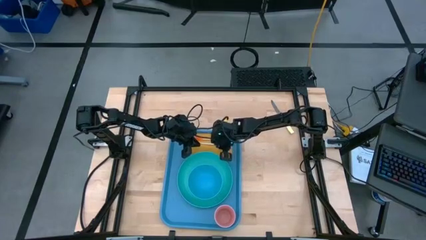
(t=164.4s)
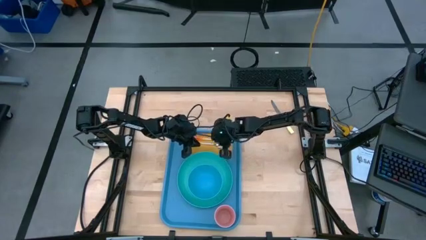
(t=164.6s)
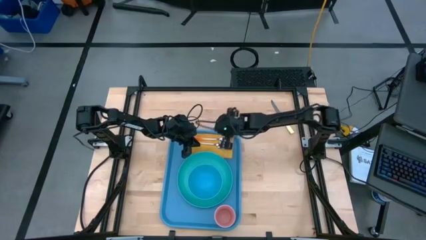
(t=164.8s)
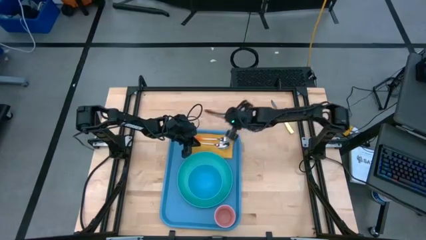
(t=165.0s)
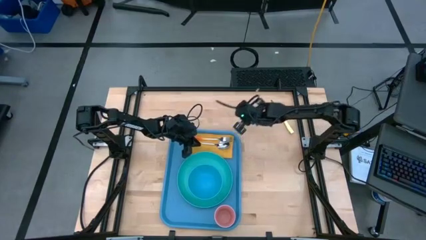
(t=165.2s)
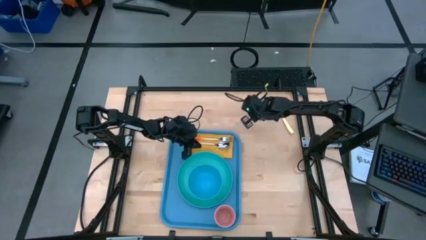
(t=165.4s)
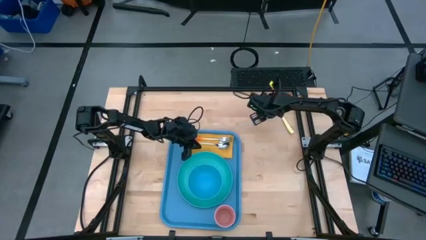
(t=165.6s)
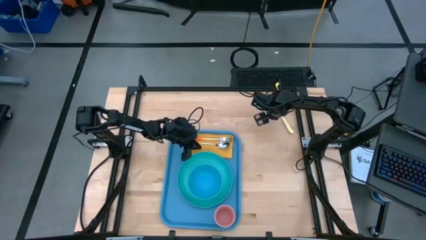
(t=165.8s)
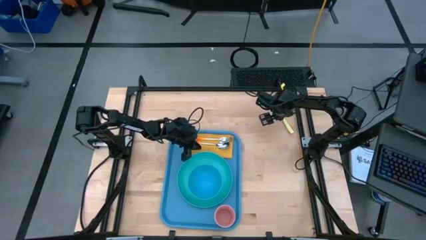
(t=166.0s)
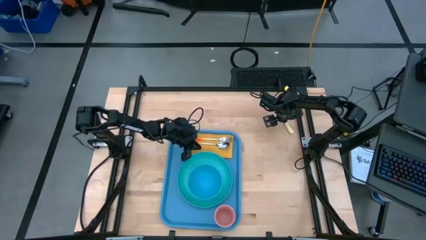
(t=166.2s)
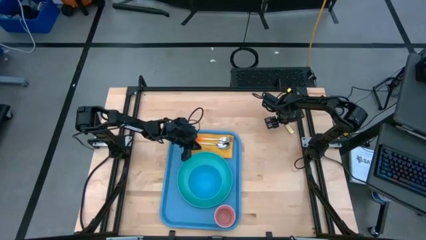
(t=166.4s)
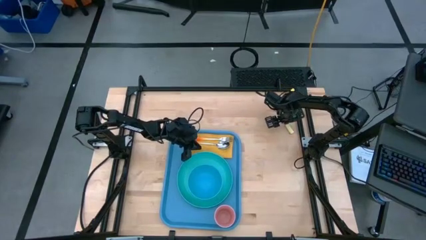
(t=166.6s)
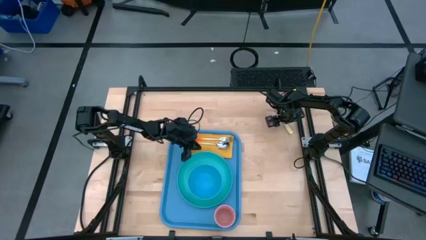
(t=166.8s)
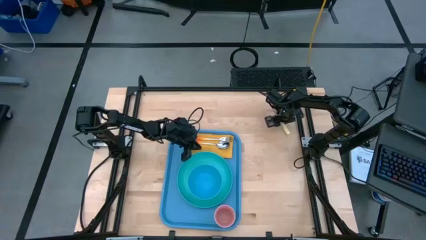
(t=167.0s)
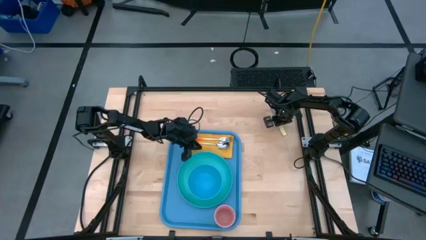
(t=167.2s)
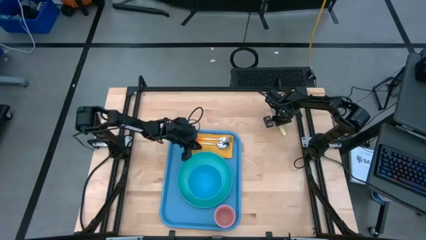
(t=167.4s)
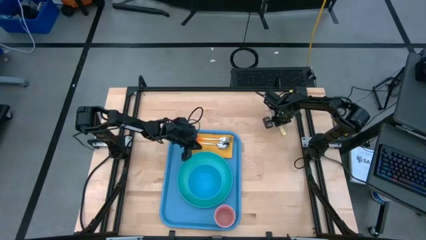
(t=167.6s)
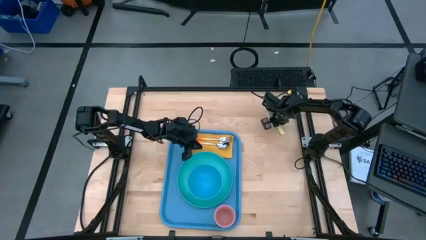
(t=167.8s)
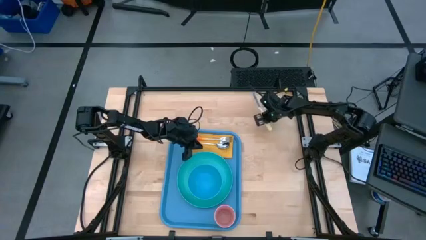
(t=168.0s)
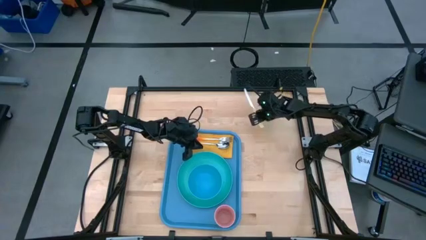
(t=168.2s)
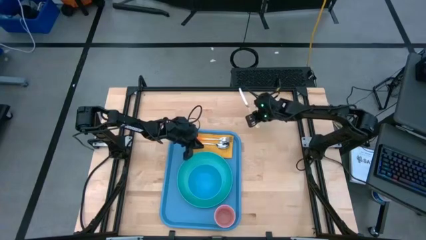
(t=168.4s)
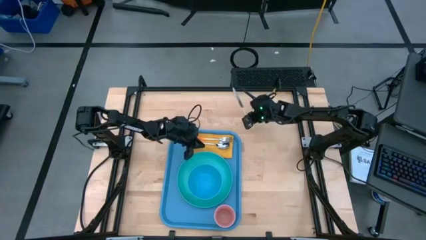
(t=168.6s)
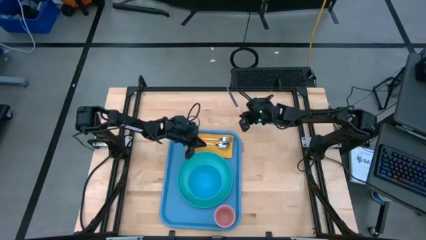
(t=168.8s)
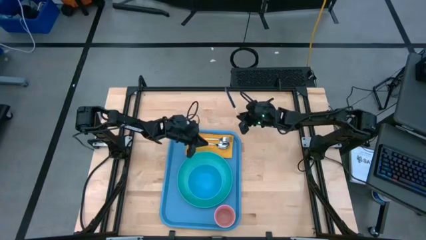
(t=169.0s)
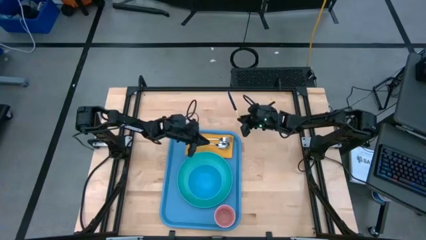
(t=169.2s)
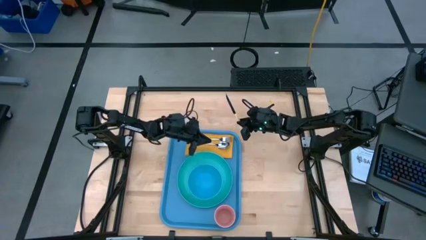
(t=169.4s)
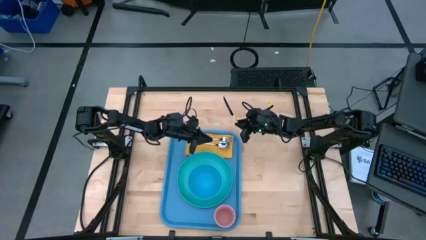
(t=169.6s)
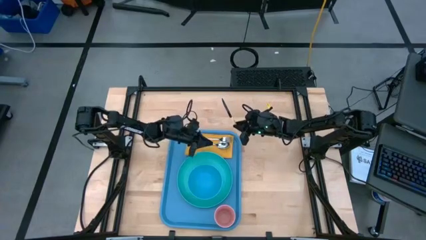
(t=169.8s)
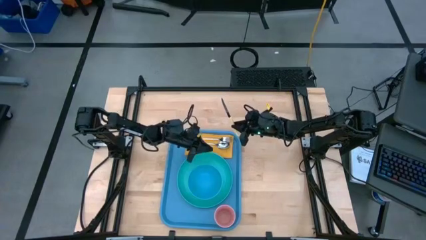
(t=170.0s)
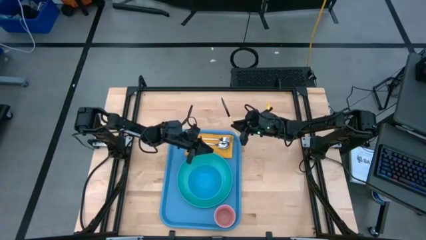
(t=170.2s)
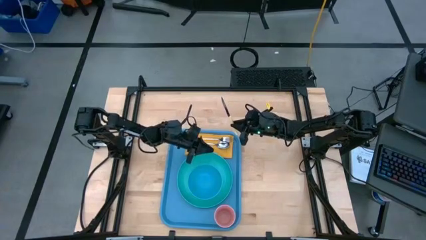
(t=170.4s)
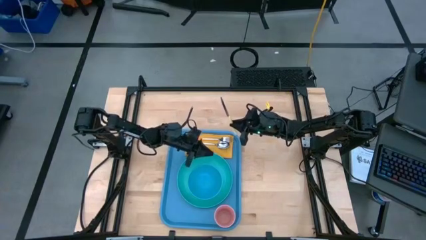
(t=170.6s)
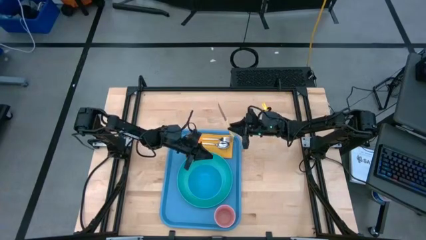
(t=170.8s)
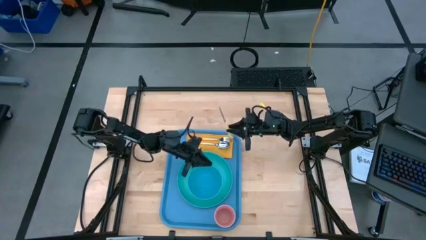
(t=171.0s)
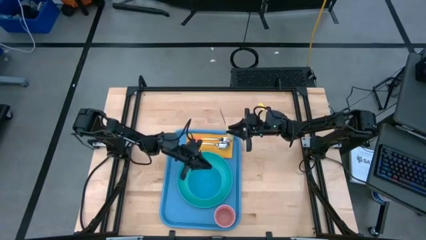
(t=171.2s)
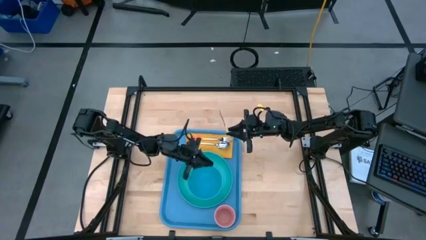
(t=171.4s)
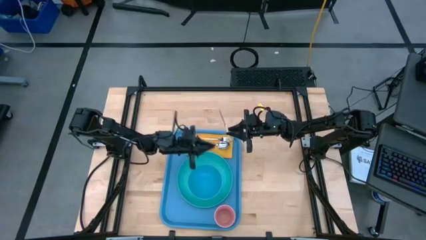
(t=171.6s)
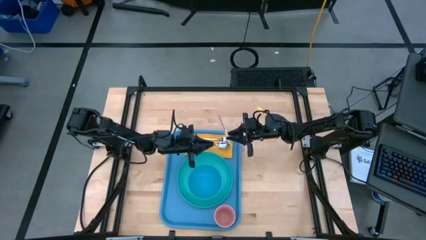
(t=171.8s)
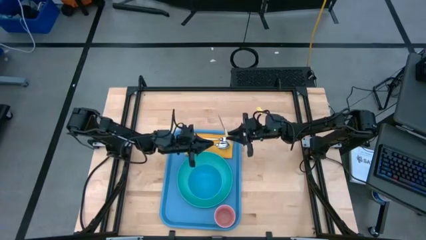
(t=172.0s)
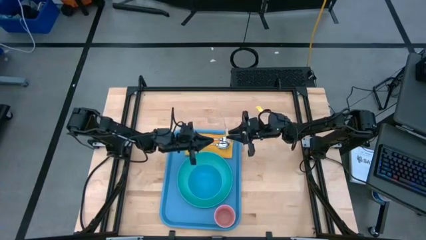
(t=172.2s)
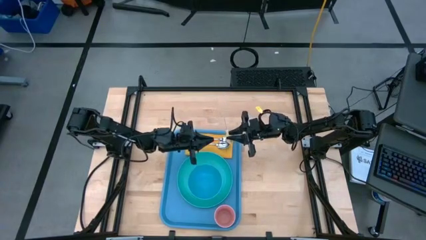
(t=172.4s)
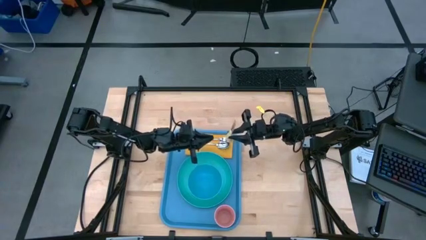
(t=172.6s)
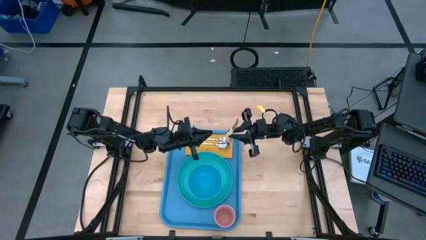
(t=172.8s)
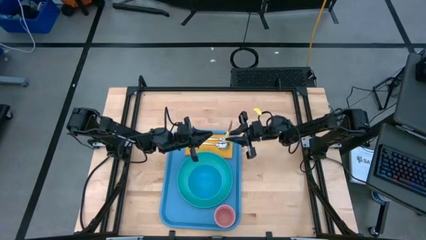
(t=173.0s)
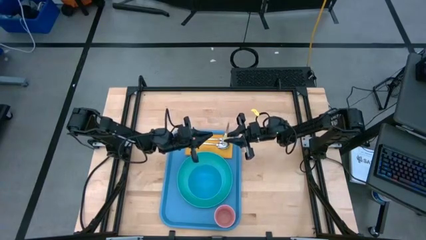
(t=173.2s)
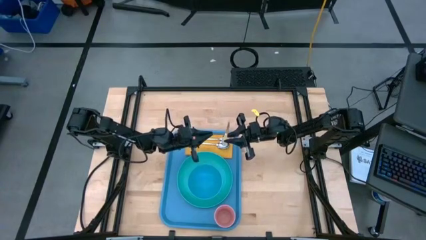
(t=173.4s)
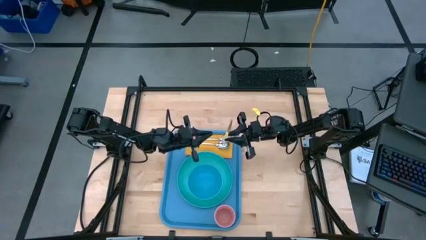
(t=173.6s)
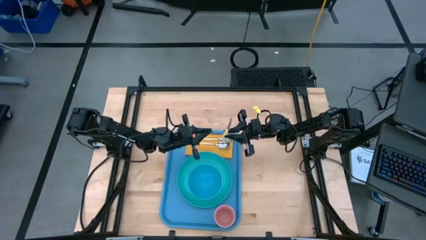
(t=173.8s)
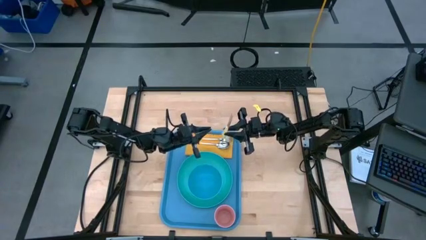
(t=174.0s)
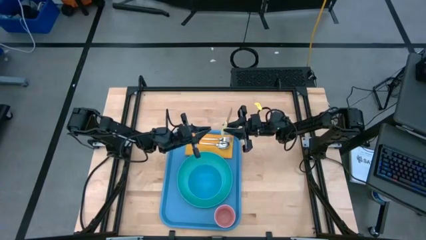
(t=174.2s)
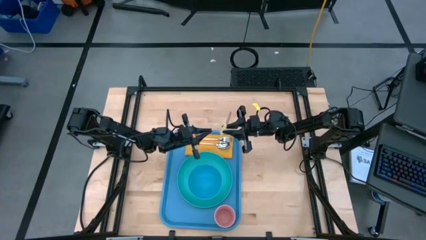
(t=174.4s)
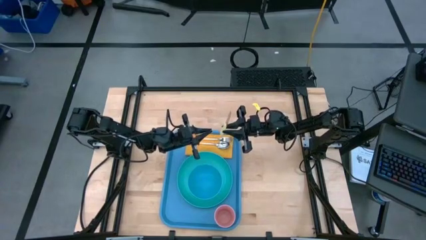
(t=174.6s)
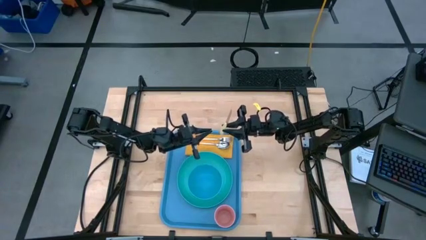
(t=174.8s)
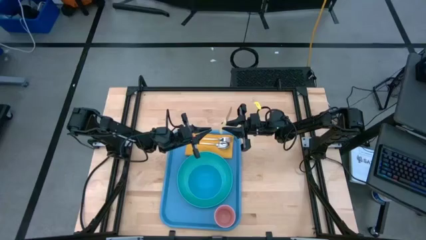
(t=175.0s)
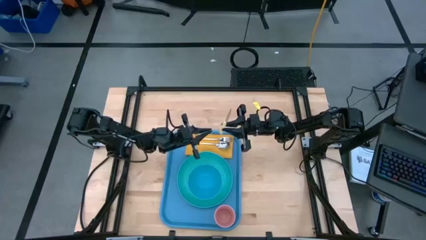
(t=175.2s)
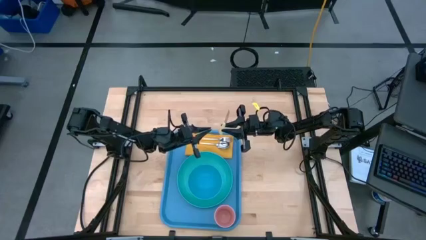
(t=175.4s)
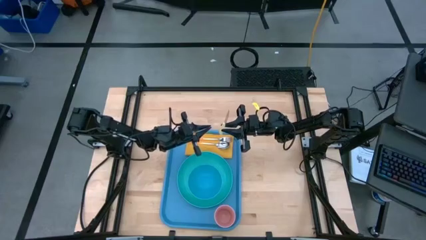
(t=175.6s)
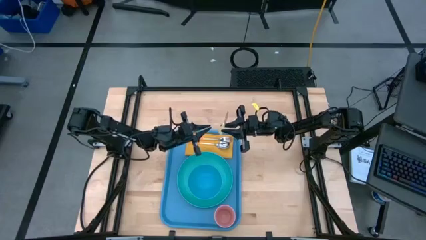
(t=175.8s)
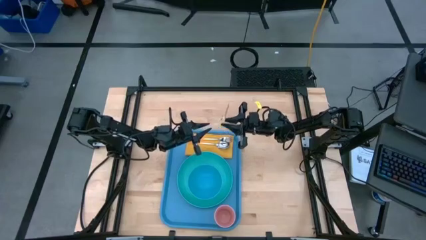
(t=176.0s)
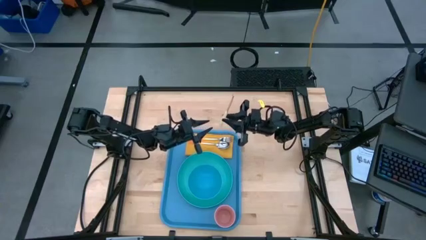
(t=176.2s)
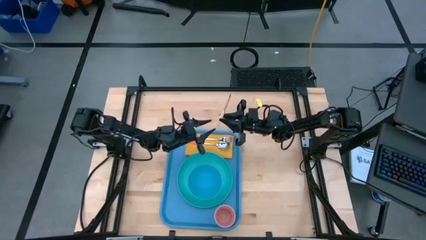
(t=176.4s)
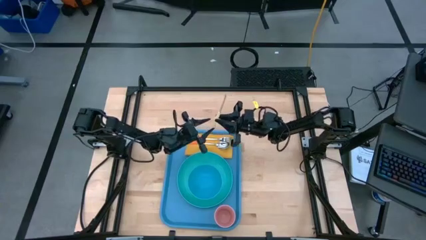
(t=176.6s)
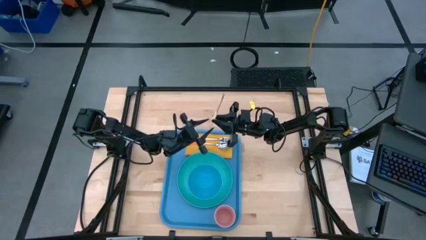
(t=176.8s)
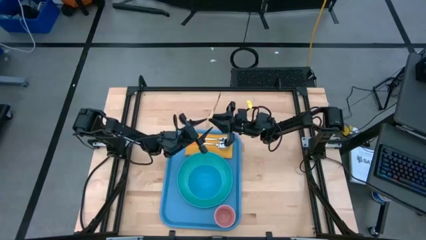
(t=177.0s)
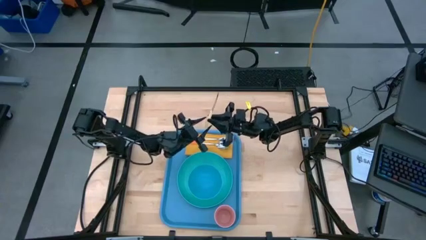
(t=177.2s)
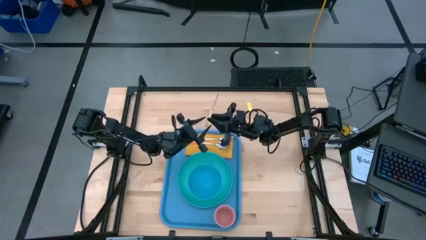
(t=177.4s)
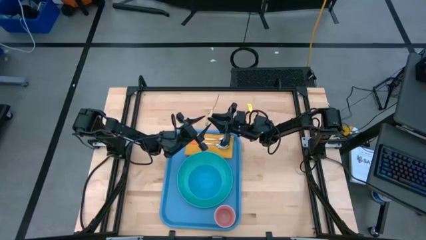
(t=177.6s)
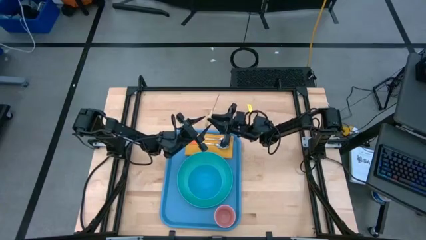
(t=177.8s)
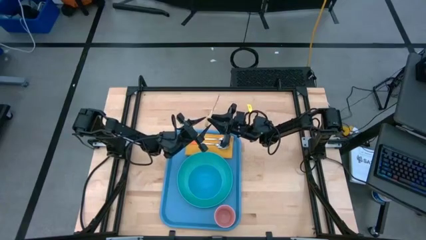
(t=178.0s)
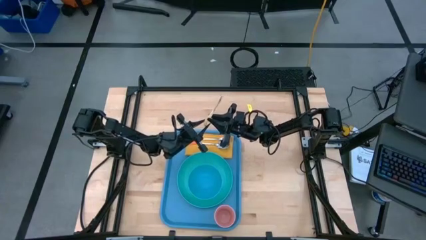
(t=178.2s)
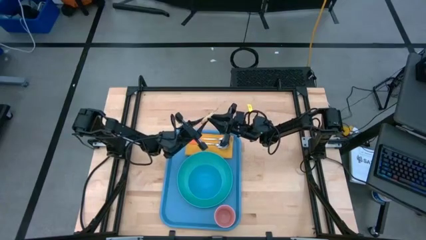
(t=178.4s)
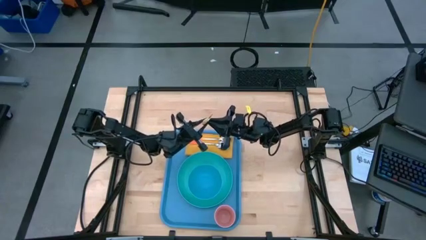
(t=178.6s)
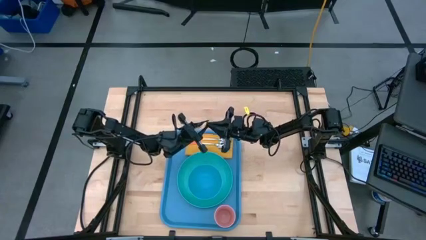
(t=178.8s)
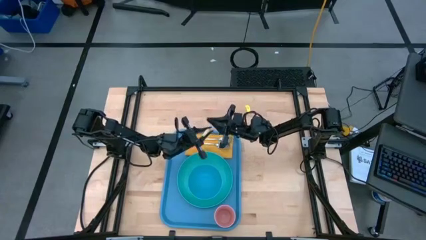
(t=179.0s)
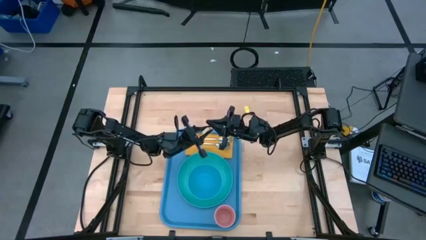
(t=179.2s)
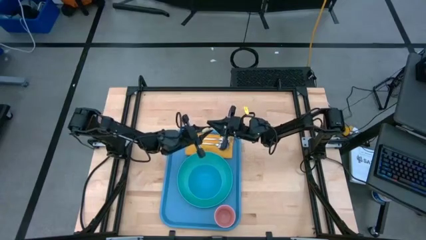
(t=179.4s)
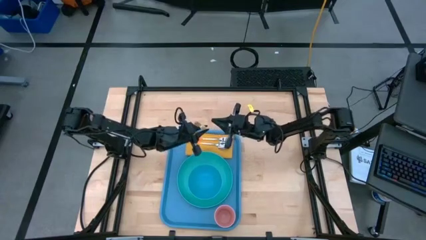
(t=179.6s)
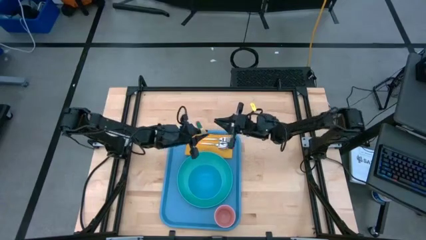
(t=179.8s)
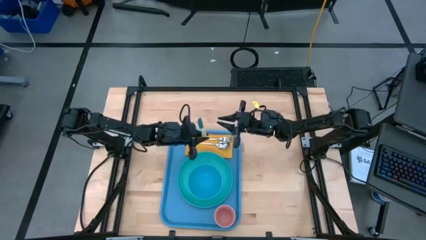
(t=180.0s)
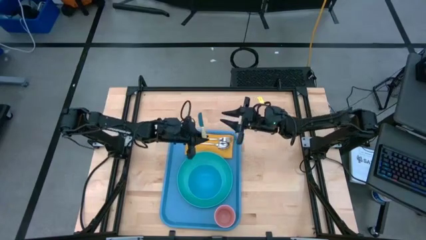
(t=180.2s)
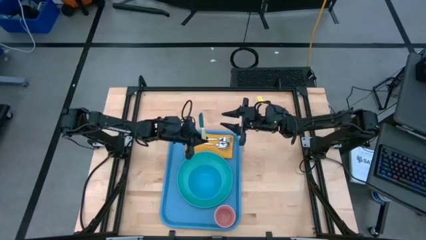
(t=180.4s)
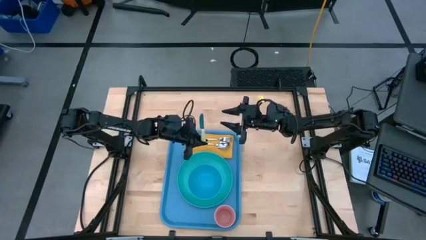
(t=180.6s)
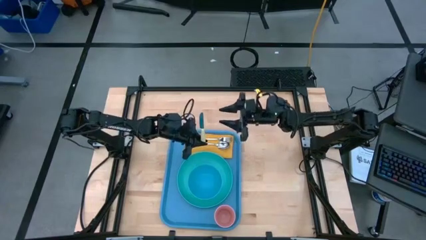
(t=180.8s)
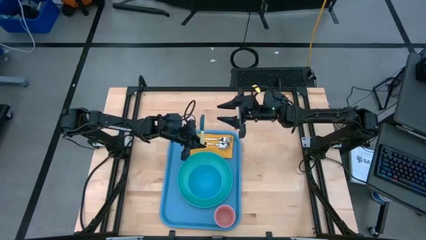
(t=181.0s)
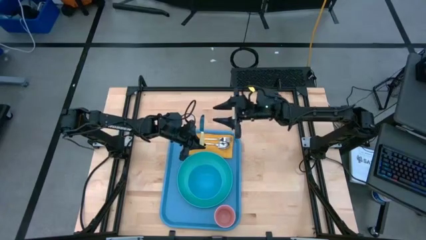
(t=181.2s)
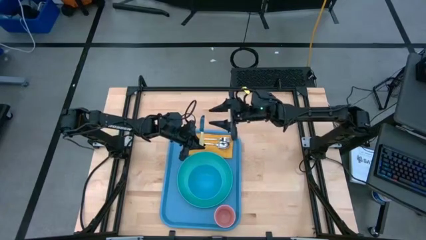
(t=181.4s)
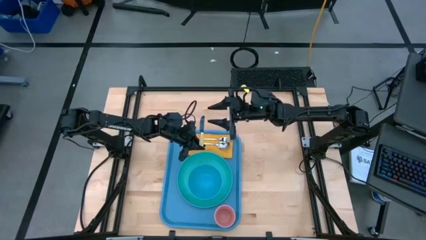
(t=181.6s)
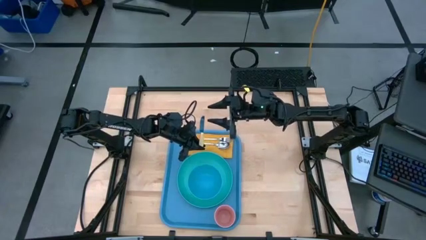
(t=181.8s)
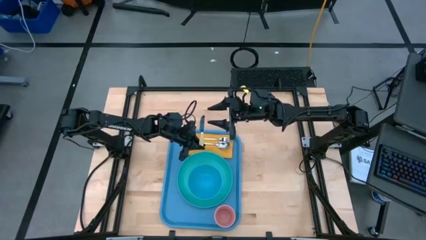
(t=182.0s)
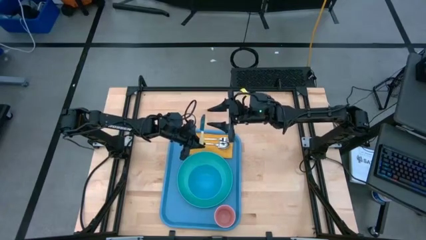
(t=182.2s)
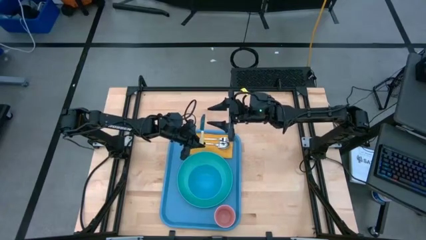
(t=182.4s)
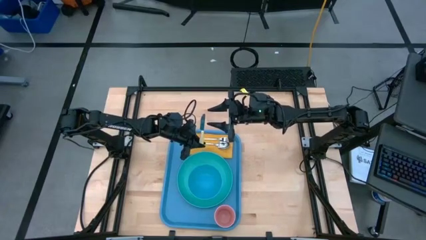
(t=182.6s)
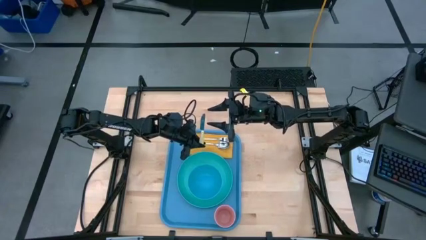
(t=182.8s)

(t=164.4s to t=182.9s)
Task: Set up tray
Put the light green knife on top of the orange napkin to the bottom of the orange spoon
